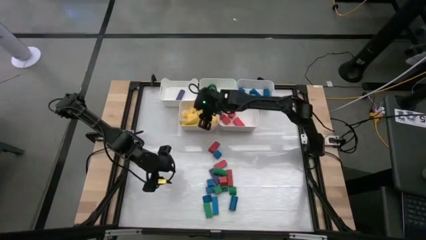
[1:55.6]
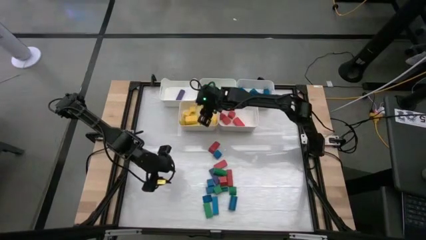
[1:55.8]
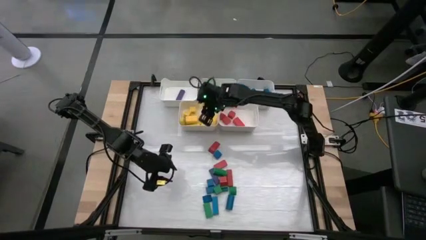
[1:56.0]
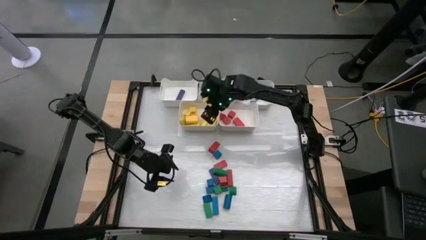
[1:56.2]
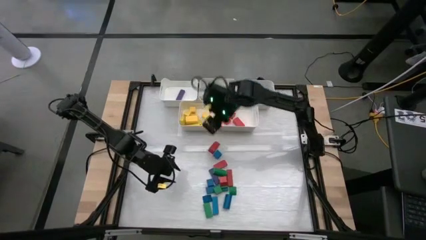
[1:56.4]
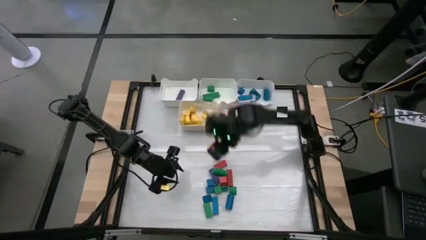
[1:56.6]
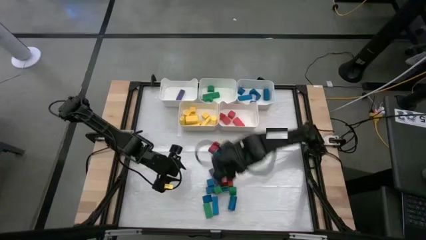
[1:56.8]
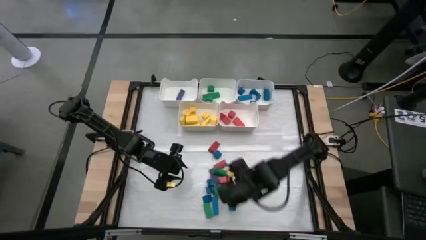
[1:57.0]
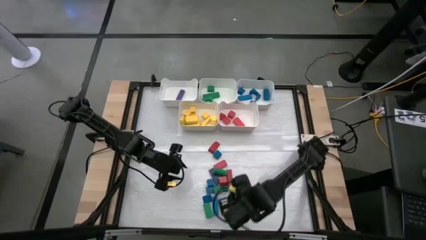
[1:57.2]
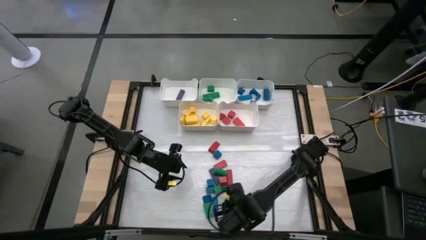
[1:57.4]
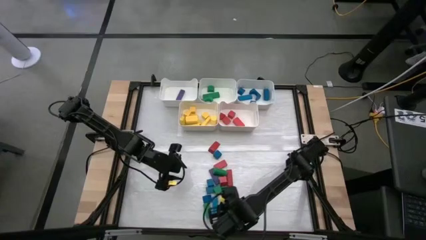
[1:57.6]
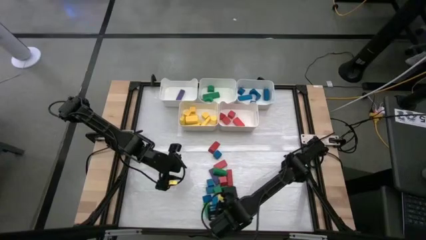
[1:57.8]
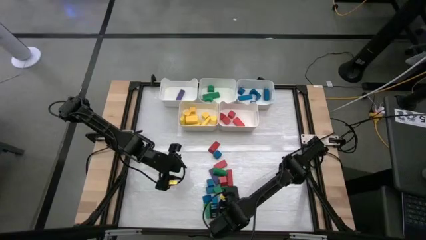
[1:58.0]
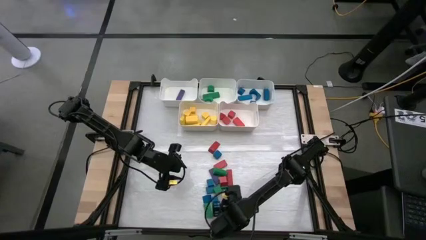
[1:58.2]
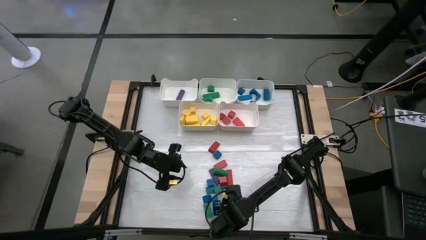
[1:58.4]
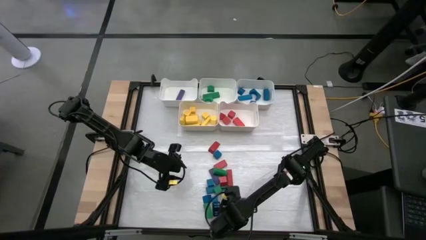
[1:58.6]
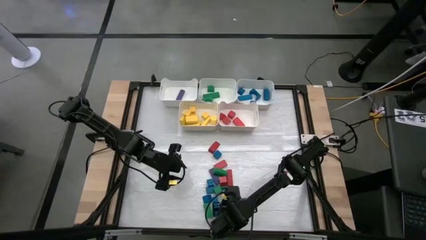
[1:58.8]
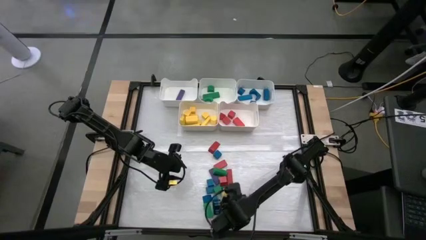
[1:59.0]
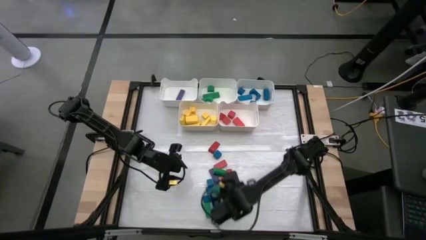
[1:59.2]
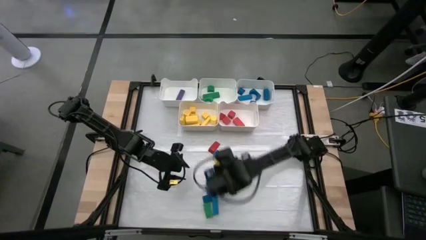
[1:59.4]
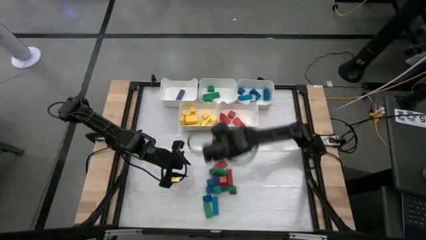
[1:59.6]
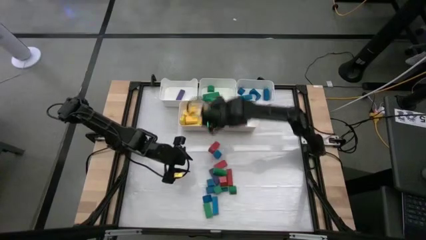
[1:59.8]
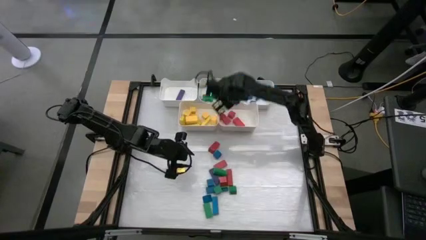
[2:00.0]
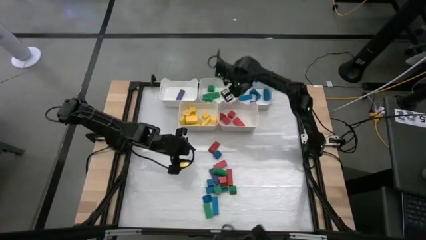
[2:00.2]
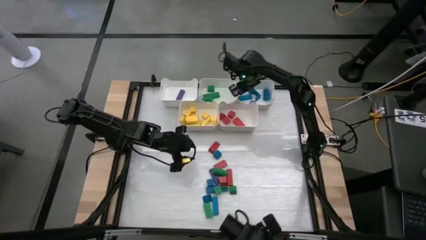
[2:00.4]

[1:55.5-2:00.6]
Task: Sort blocks
Put the blue block into the top right bin

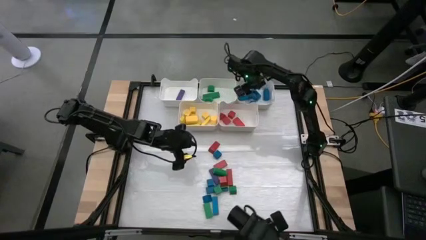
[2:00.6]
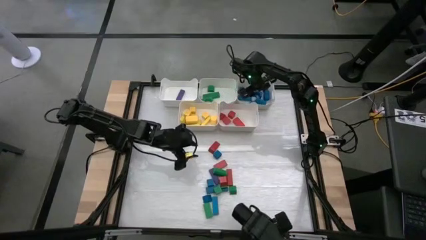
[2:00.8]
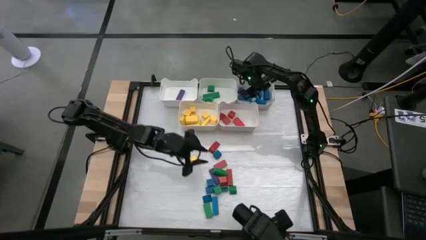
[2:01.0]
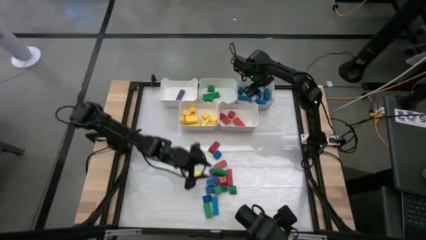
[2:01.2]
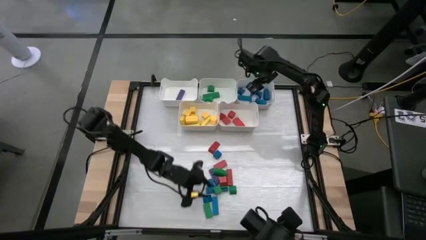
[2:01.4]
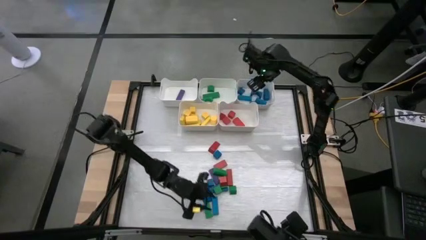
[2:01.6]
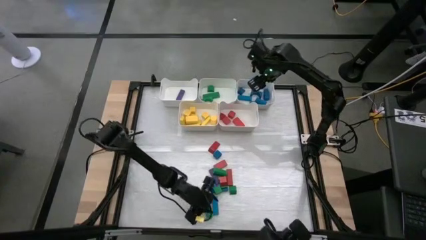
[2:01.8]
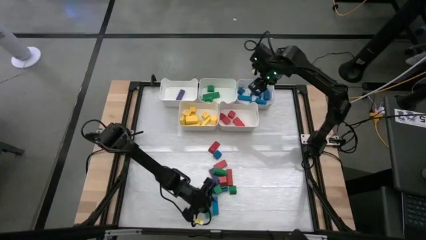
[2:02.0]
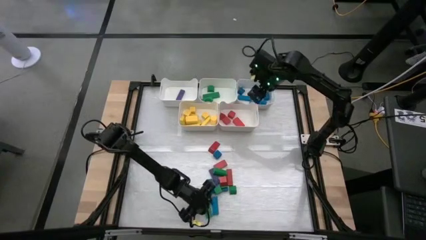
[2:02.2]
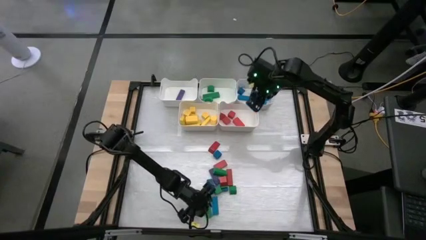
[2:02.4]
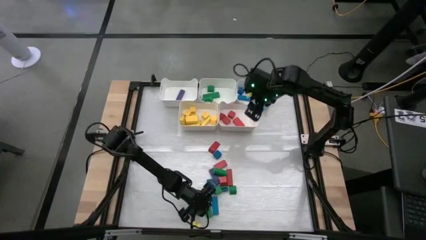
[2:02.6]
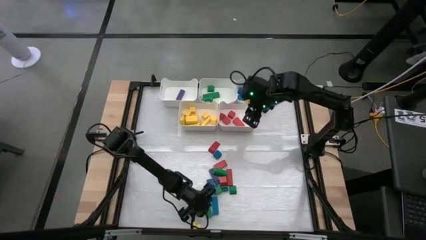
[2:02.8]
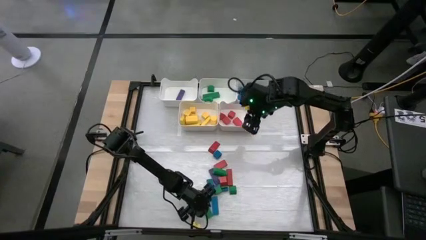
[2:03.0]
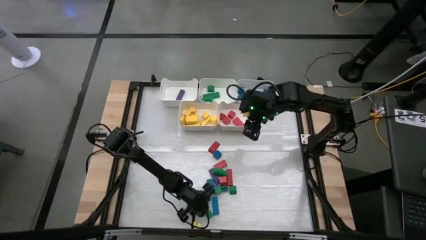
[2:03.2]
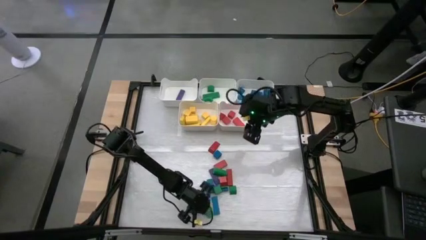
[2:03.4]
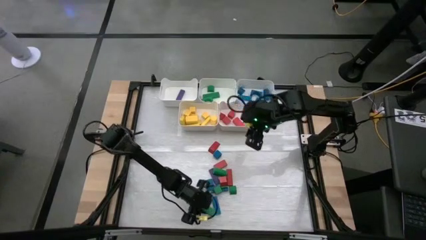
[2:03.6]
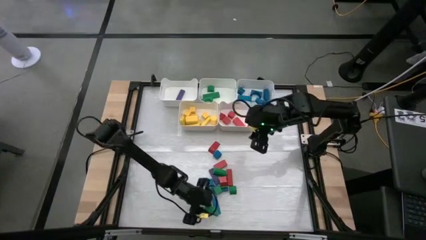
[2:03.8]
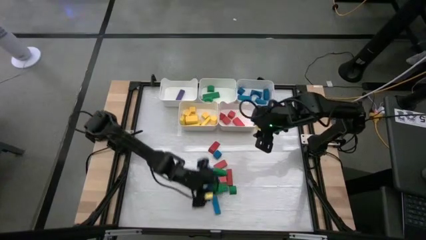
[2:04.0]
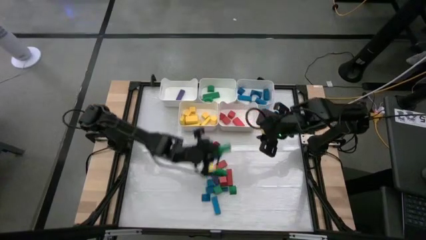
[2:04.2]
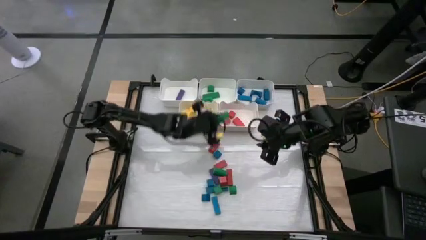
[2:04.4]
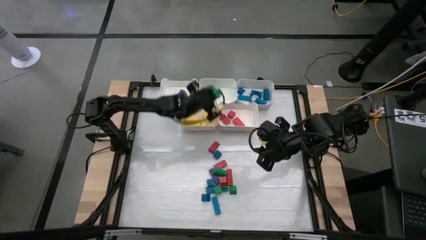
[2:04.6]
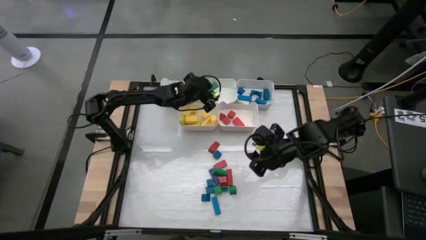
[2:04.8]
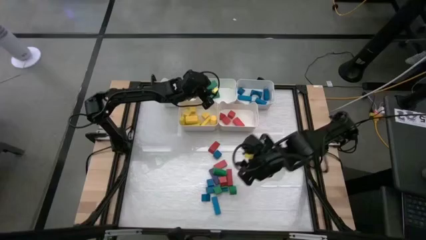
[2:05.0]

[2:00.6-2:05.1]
Put the green block into the top center bin

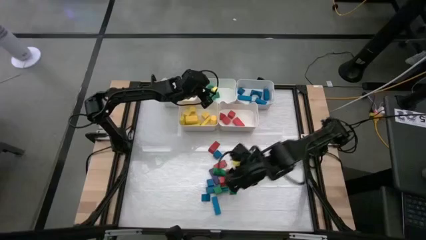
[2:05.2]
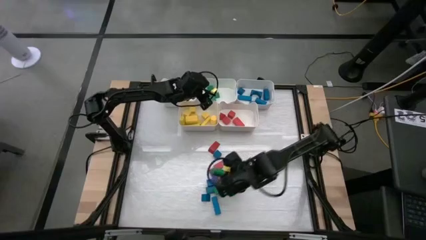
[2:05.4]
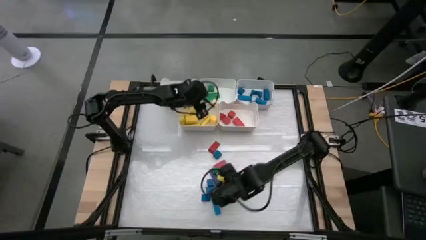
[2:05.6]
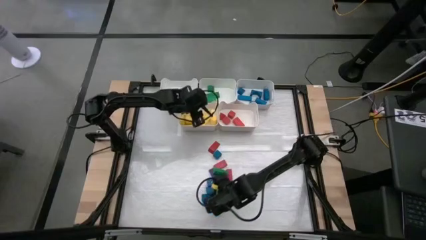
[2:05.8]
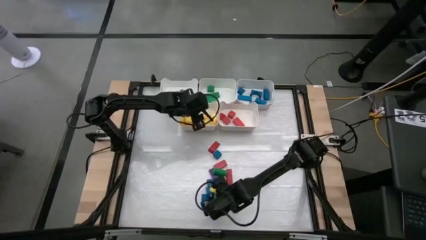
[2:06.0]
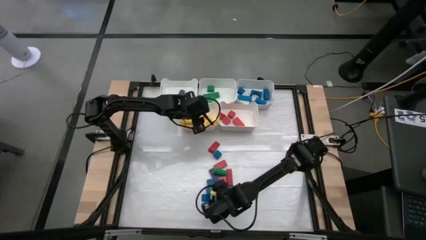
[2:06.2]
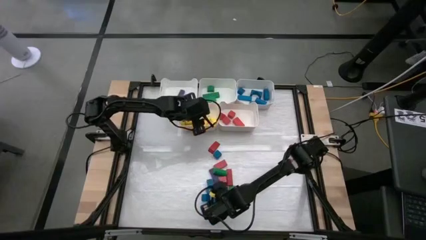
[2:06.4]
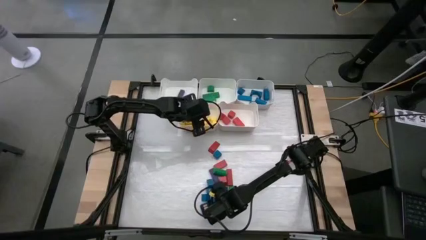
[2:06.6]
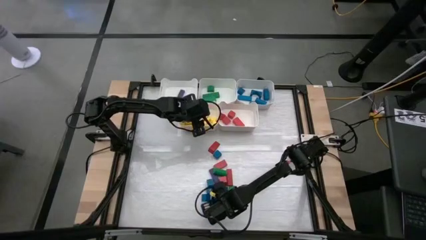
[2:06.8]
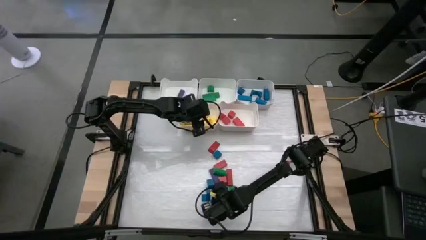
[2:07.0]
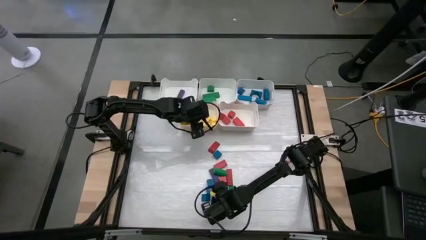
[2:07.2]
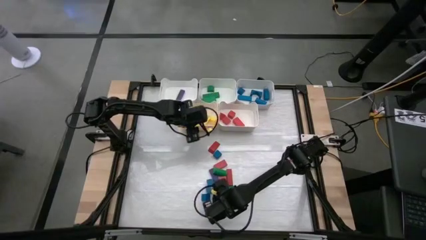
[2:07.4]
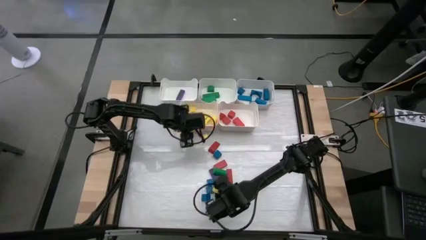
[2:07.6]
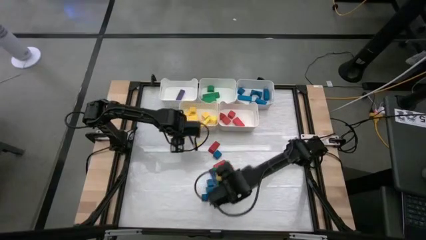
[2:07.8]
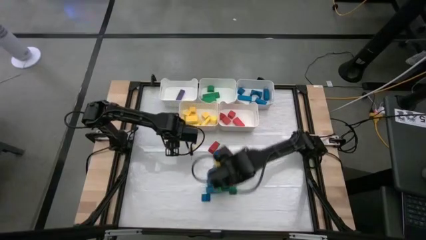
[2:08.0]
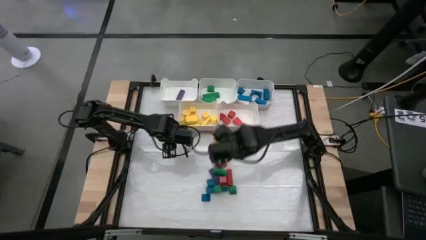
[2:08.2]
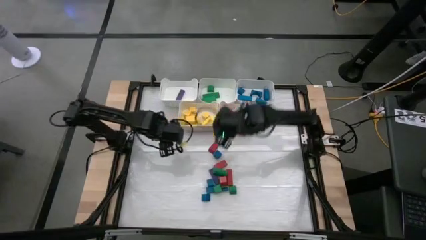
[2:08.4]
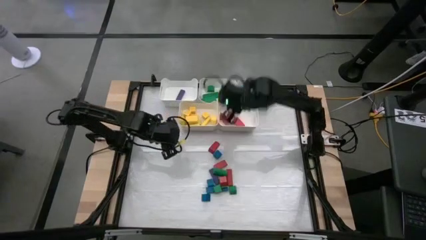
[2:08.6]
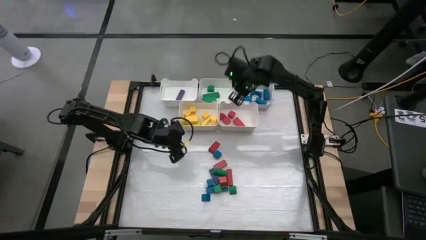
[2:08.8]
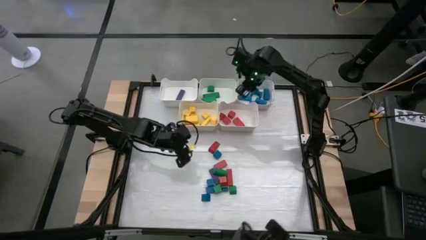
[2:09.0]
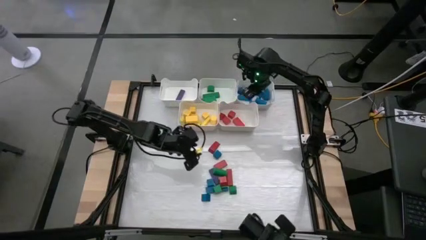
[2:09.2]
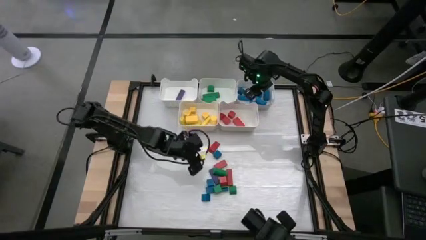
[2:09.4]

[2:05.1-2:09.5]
Put the blue block into the top right bin

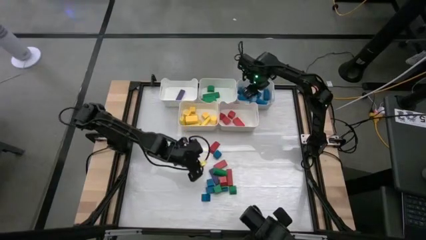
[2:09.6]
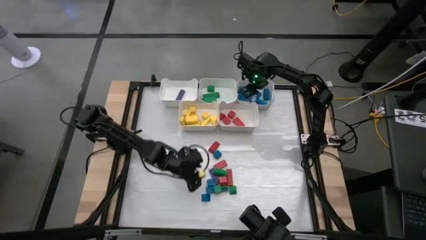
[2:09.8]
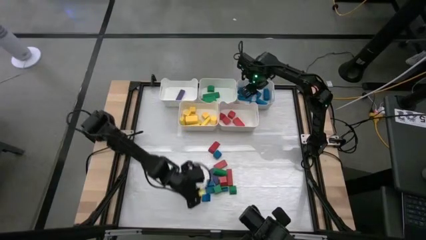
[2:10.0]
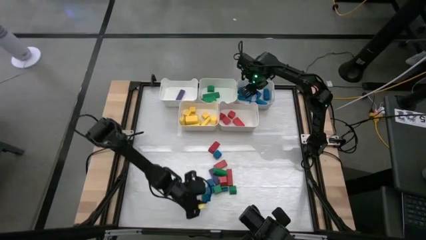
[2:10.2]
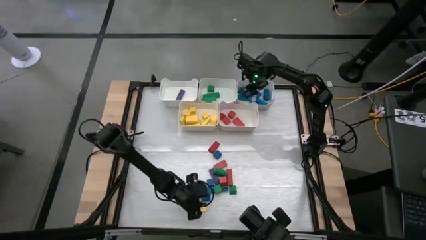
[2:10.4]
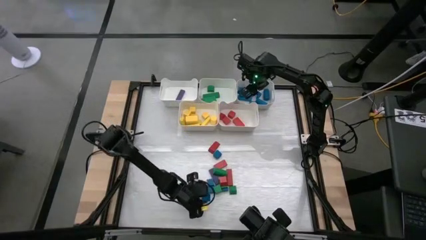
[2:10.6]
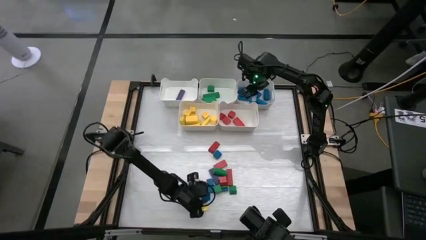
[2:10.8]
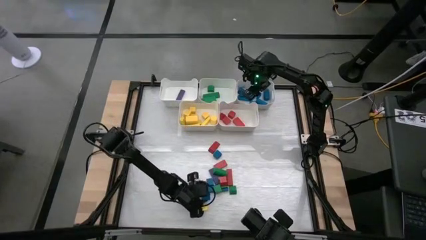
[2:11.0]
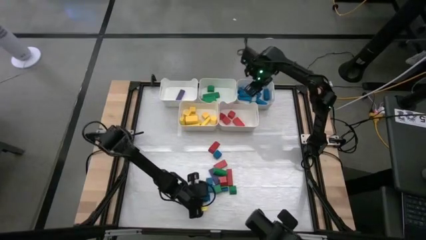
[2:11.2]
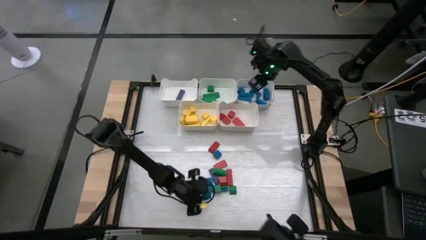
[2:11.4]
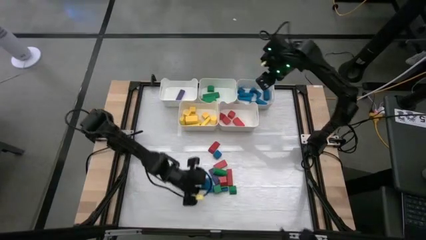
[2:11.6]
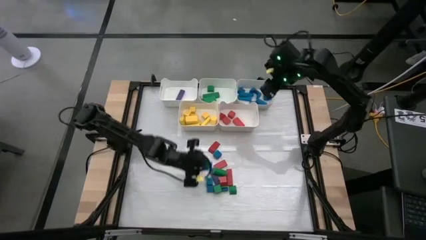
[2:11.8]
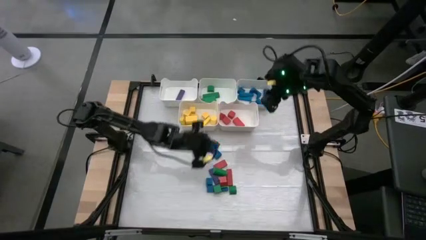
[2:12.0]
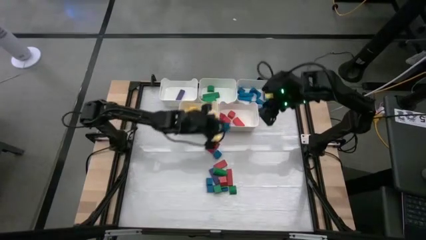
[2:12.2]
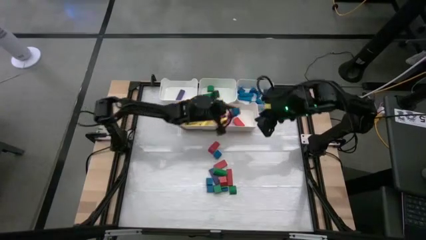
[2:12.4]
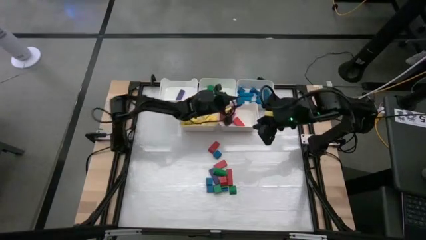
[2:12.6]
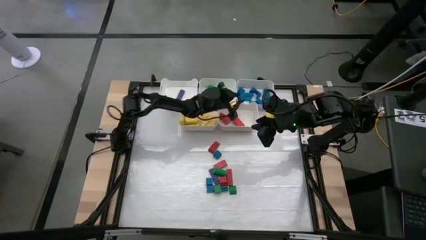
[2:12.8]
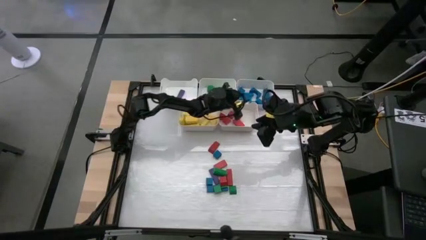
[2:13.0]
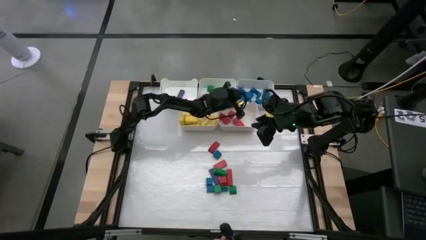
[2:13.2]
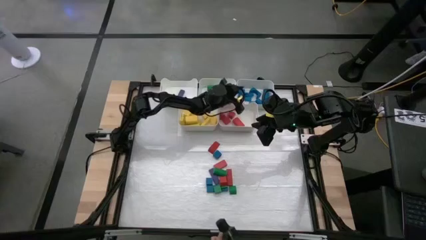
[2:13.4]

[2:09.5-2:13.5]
Put the blue block into the top right bin
